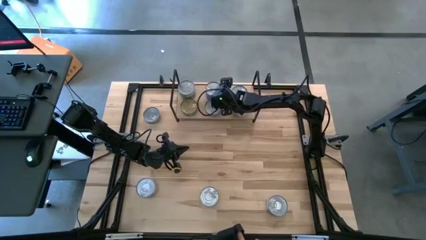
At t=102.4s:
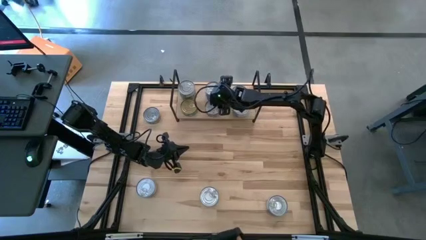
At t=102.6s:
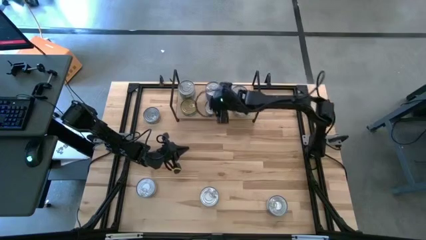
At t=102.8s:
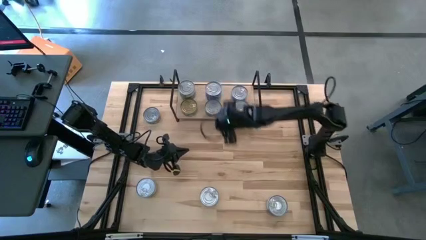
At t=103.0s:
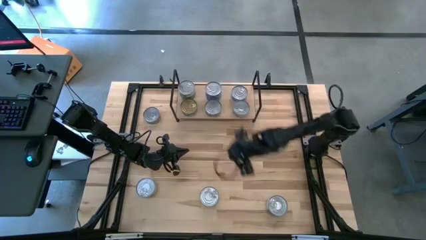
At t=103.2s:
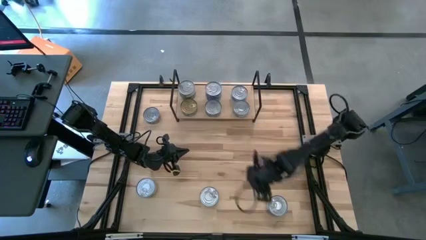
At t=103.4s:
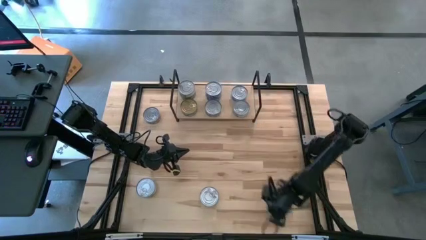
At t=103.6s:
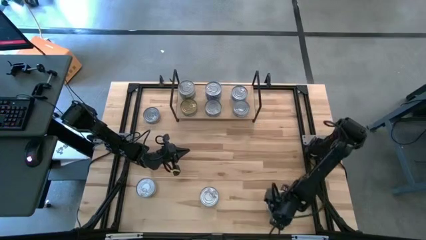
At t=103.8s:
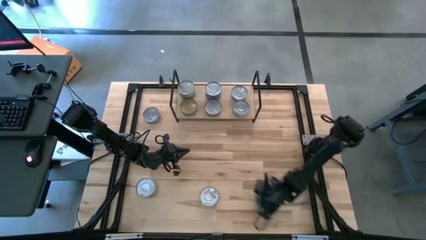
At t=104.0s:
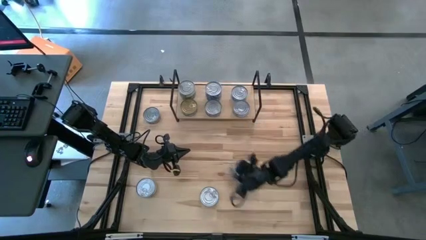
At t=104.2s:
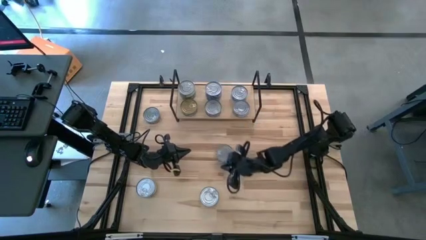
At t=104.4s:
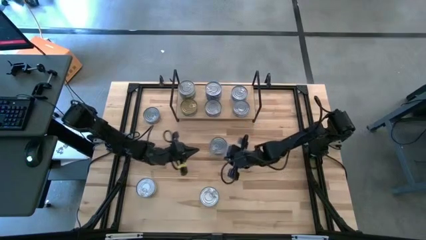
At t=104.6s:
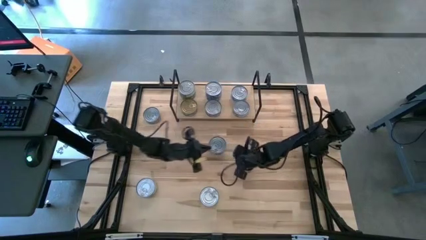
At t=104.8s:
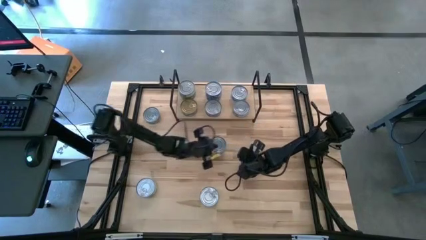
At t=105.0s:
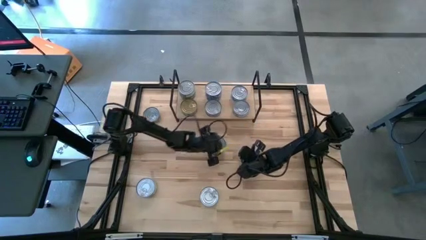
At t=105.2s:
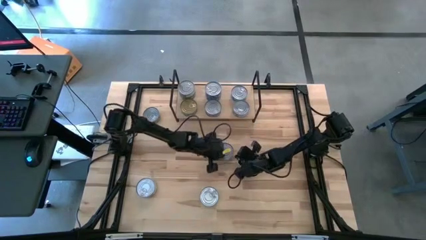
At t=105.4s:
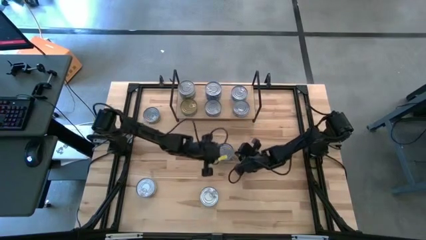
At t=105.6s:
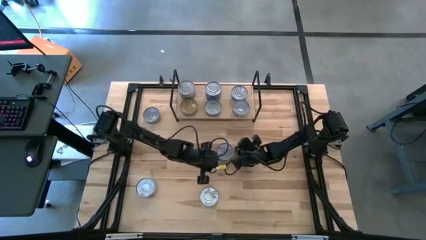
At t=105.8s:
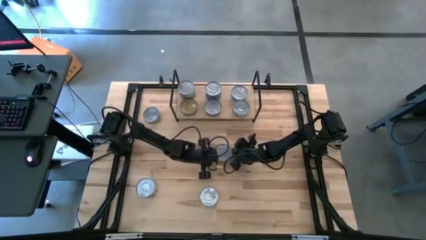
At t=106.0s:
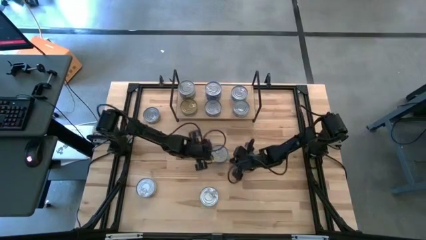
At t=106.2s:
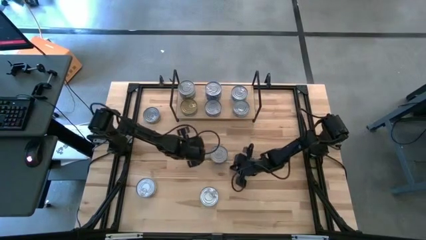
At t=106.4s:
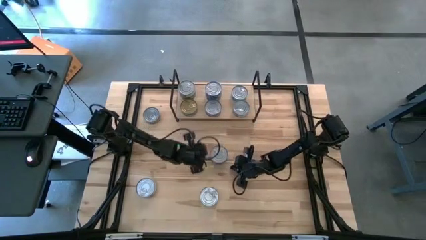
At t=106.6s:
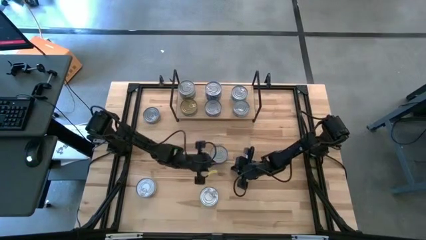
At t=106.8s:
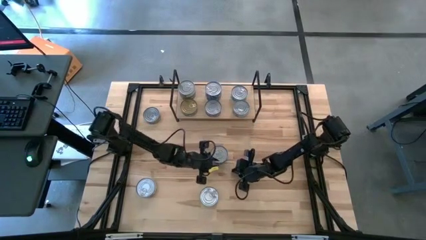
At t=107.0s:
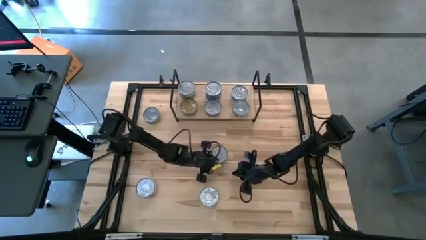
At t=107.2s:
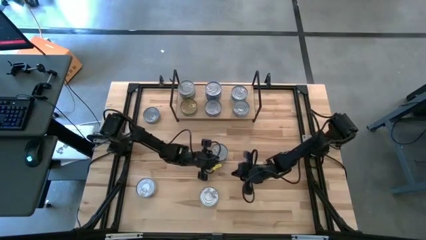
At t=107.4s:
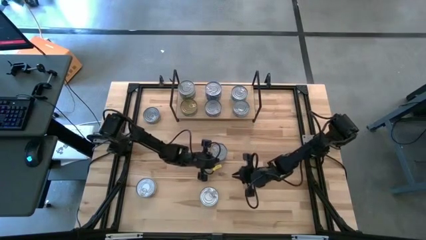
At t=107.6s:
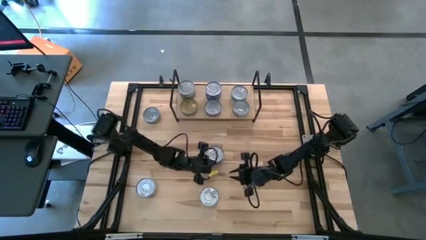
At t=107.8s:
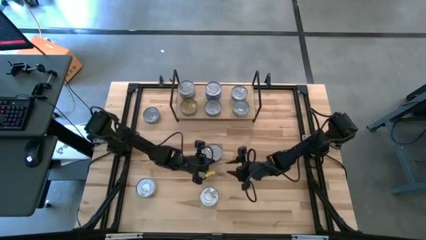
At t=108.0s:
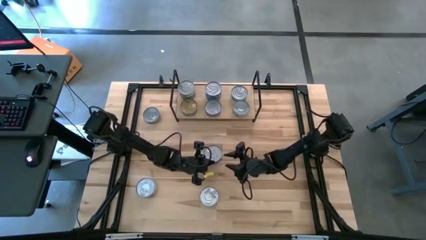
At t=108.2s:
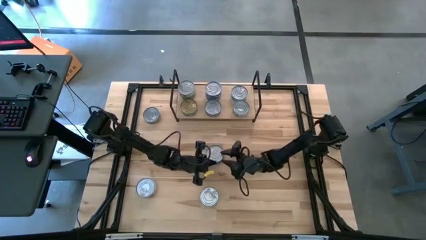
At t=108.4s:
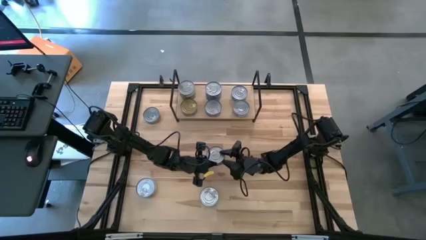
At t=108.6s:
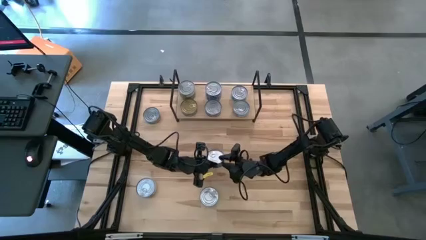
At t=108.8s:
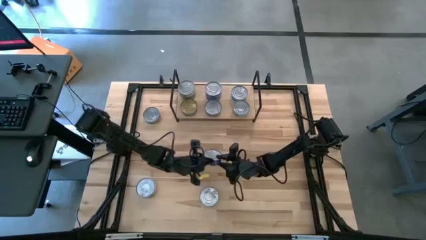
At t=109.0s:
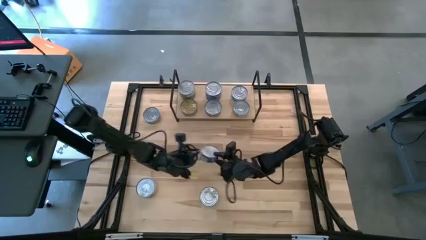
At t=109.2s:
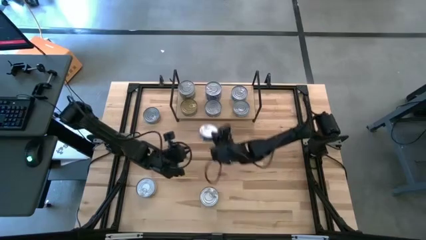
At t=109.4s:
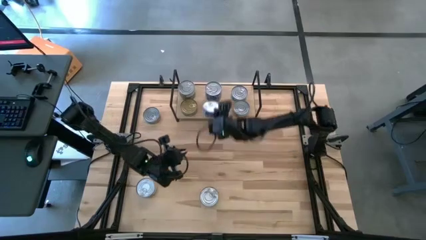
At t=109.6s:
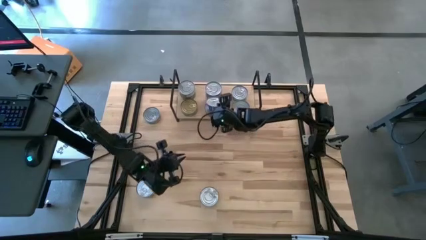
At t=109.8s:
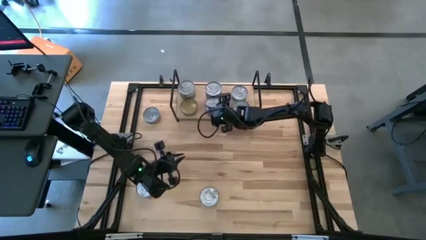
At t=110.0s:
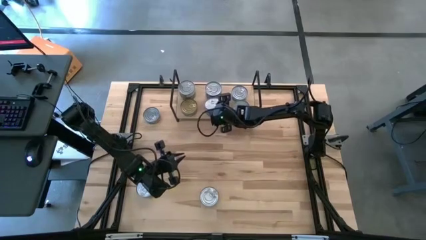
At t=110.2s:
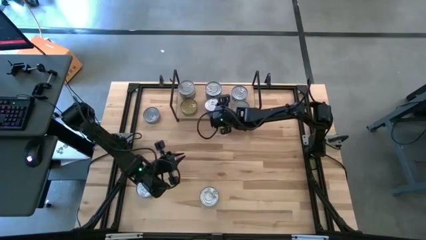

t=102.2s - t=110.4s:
Task: Stack canned seafood by type on shelf
Stack the blue tuna can on top of the blue tuna can on the shelf

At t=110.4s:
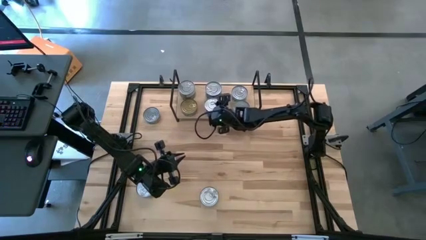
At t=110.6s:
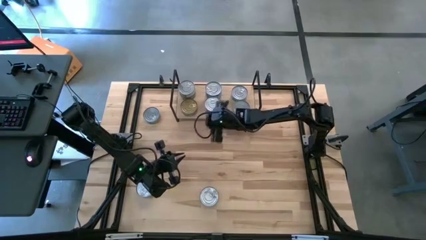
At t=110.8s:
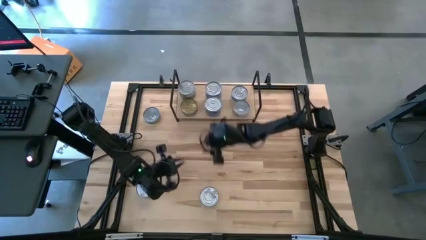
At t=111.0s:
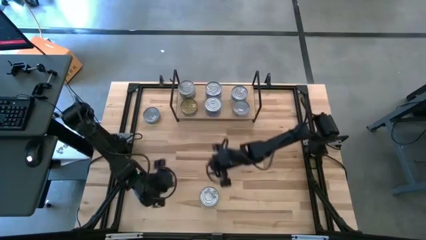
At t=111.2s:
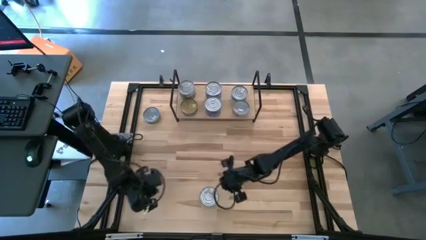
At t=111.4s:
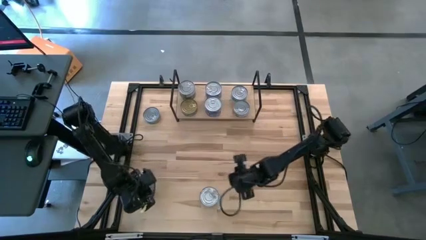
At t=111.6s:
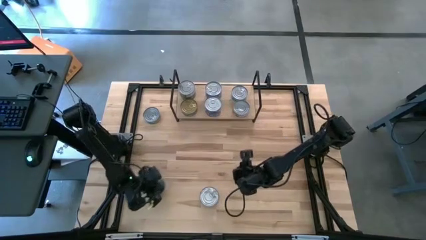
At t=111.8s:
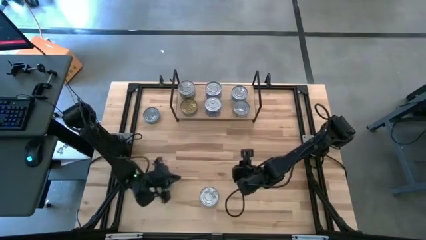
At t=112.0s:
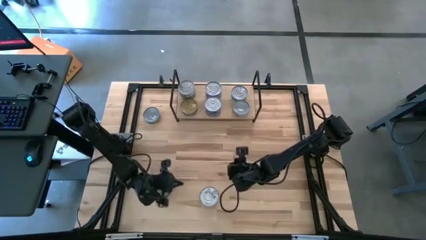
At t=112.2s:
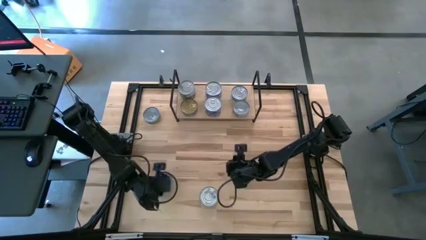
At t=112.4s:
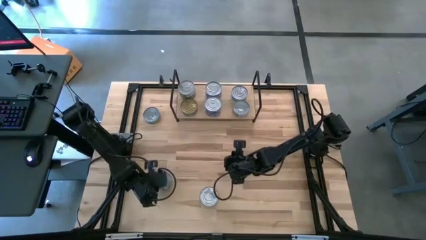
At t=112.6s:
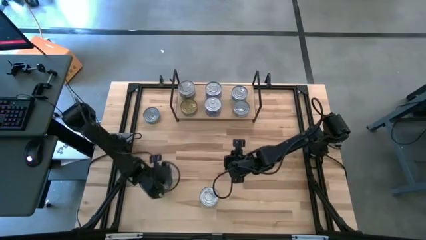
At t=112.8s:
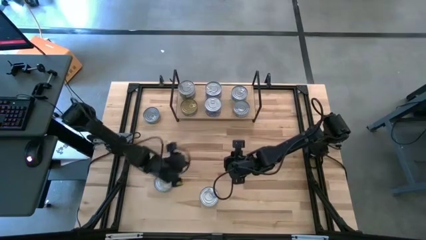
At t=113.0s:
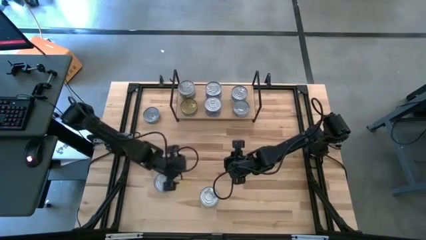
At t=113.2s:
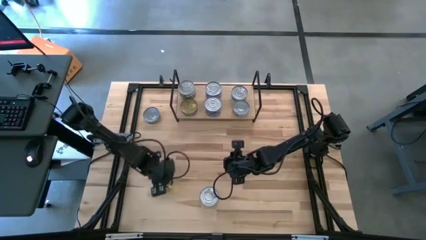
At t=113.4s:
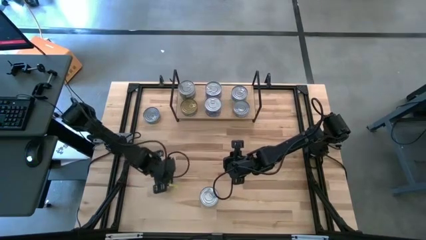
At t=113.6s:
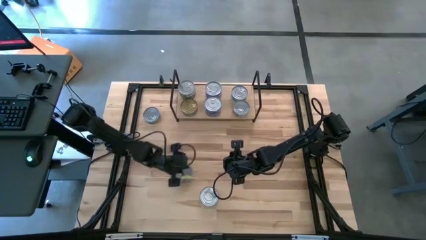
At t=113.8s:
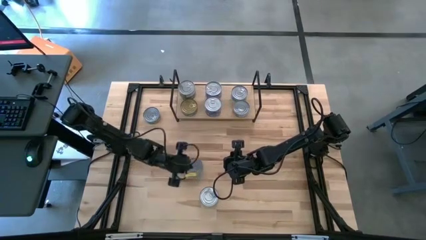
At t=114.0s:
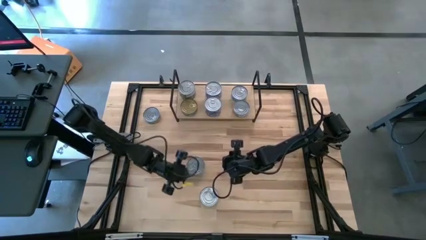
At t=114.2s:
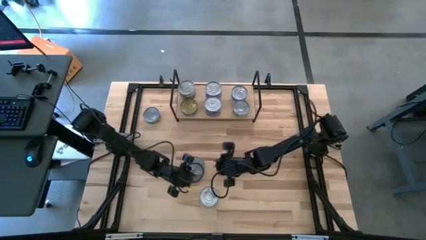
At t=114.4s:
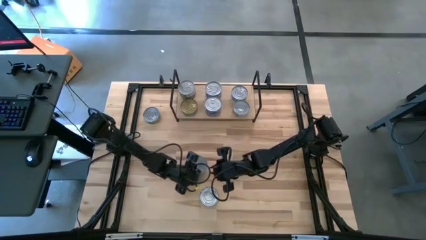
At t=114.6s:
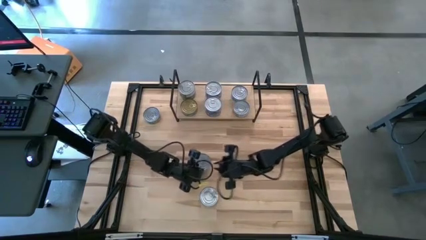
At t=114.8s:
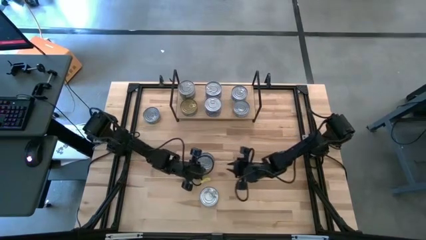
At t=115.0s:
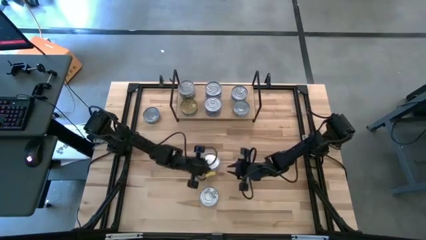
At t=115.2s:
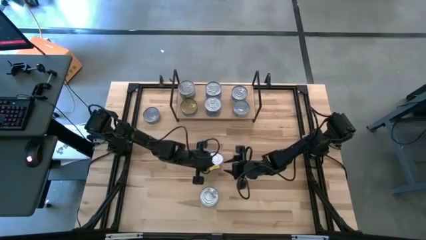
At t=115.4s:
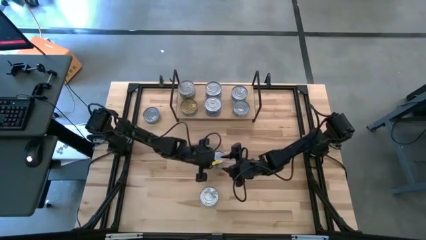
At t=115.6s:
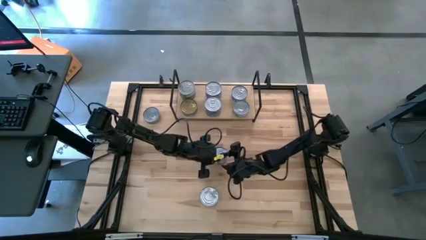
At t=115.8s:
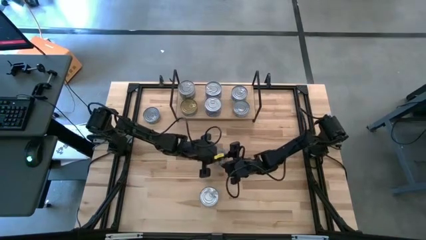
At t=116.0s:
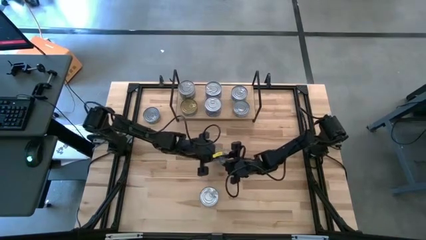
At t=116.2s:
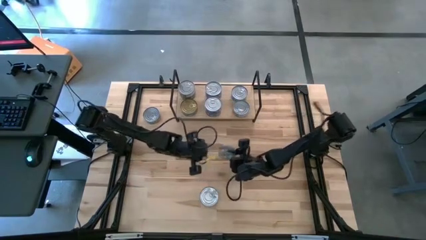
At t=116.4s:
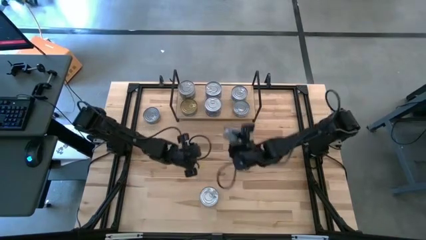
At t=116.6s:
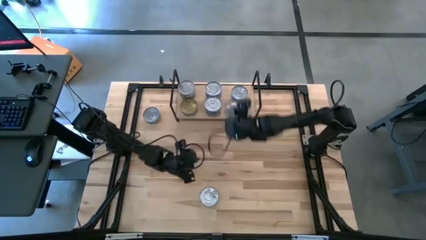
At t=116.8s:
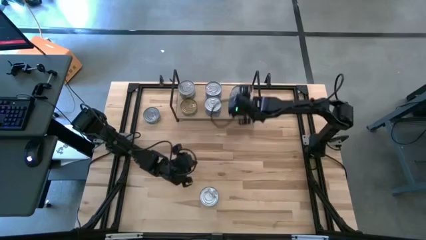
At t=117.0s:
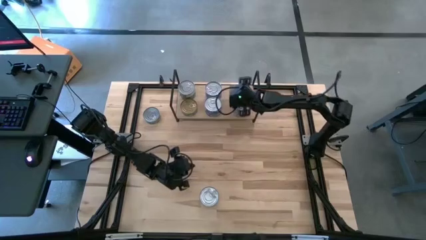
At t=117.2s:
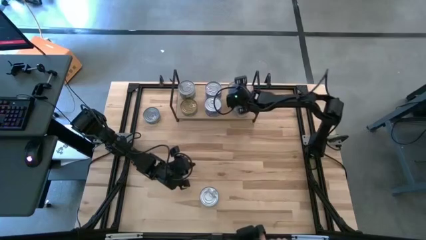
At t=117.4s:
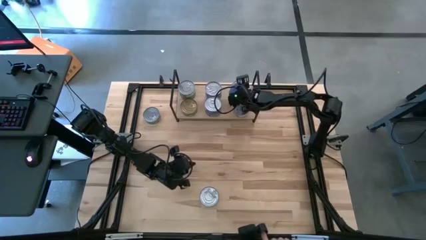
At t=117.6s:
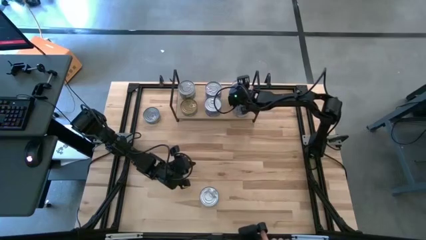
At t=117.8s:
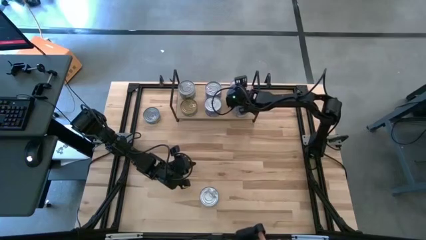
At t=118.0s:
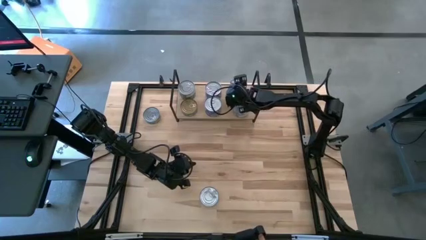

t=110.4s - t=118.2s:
Stack the yellow blue tuna can on top of the yellow blue tuna can on the shelf

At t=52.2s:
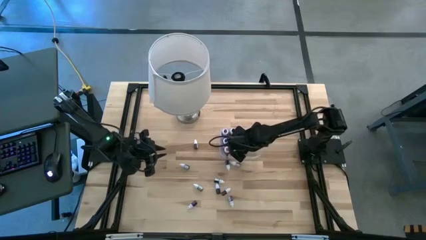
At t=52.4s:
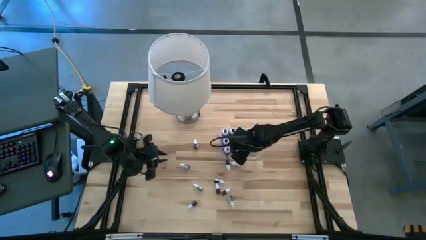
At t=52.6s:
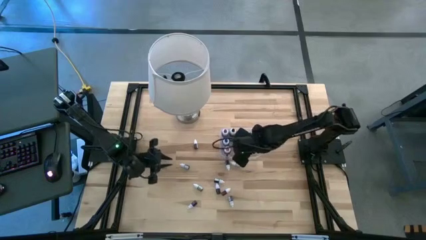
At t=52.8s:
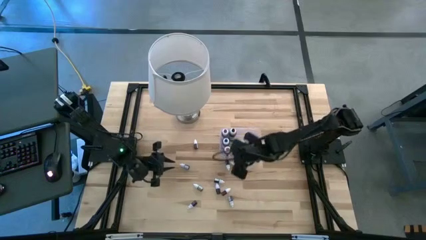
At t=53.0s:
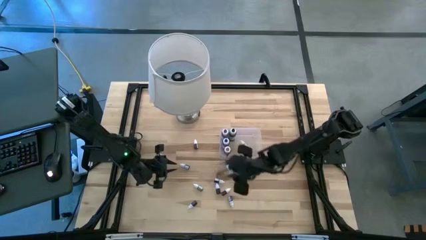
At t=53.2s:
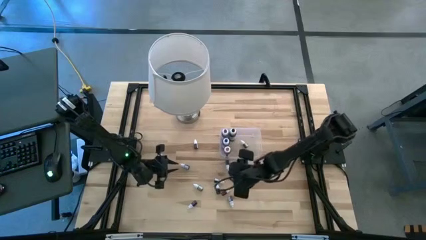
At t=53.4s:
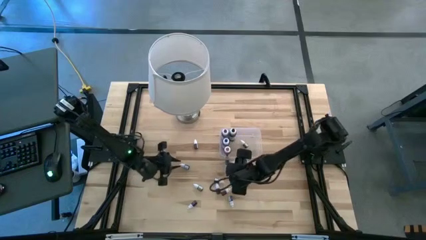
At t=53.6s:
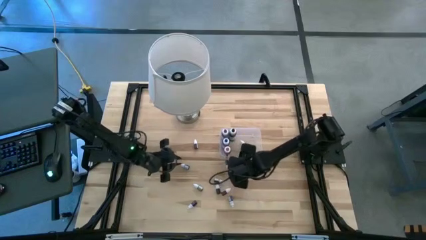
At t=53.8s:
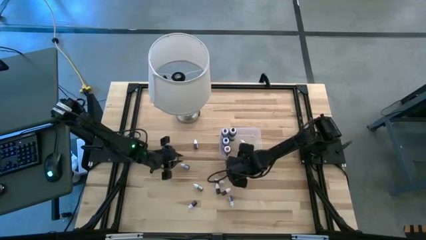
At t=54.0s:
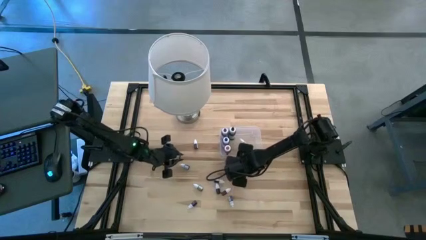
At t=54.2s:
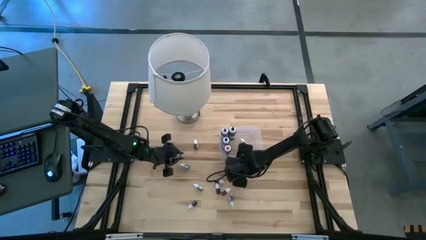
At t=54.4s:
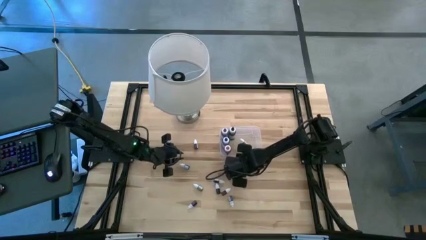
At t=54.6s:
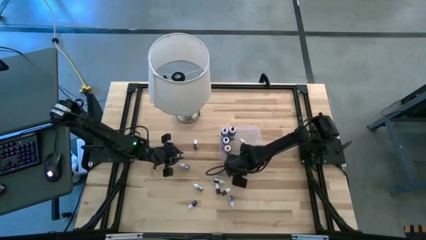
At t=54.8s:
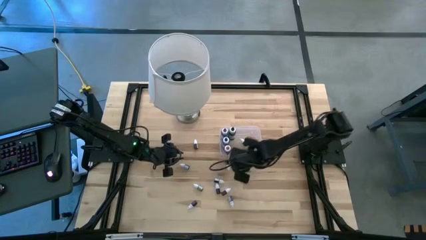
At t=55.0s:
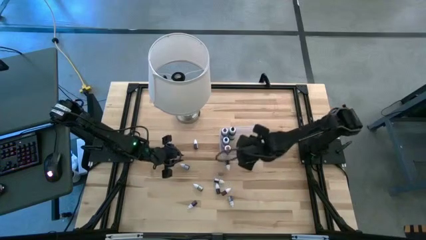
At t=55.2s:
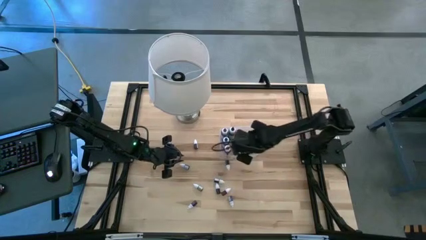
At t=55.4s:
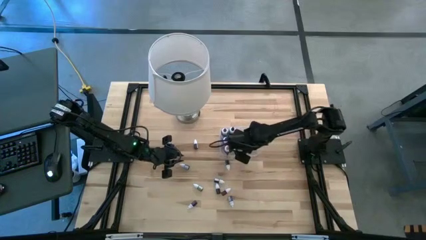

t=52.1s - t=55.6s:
Task: Pick & Place food coloring
Put the top small red food coloring bottle into the transparent bin
